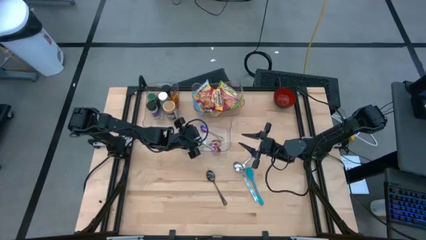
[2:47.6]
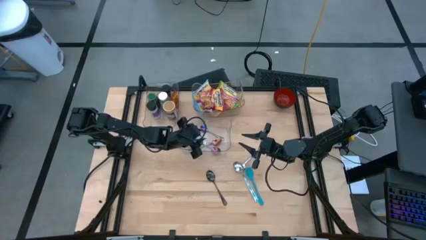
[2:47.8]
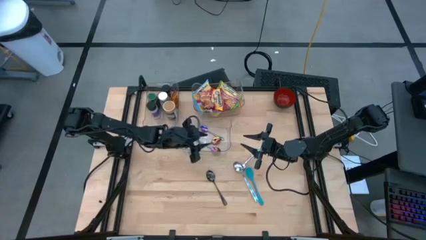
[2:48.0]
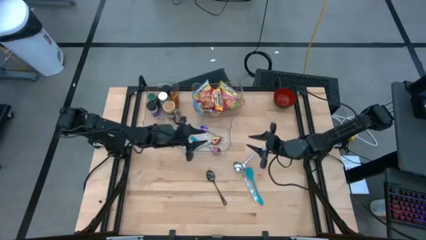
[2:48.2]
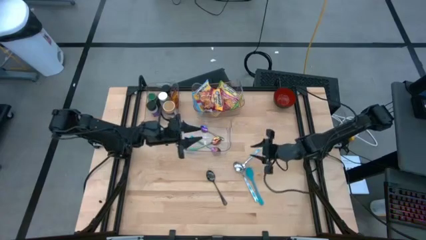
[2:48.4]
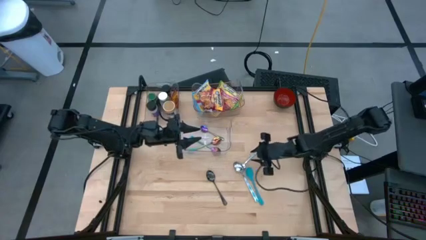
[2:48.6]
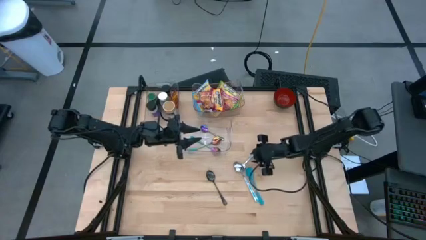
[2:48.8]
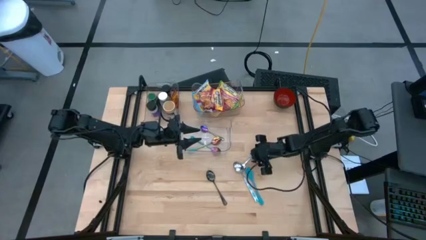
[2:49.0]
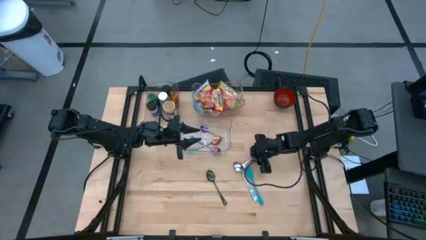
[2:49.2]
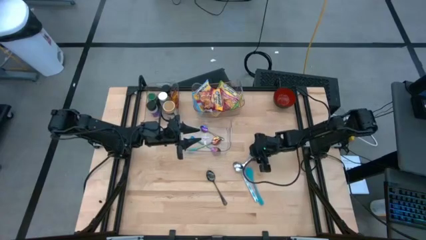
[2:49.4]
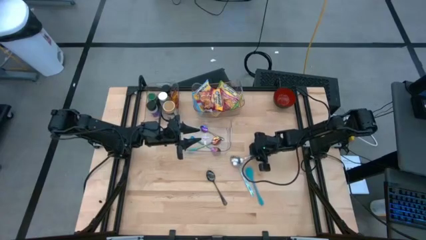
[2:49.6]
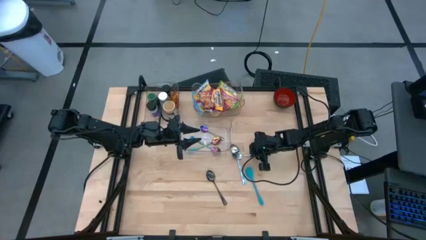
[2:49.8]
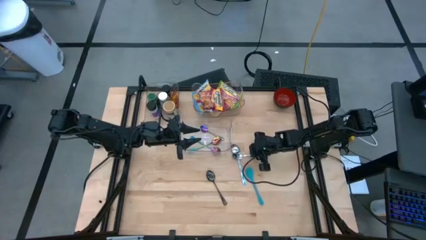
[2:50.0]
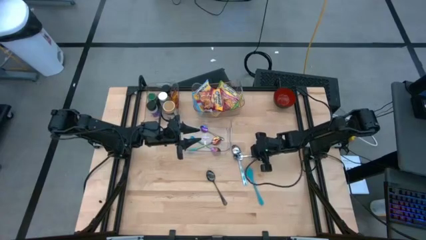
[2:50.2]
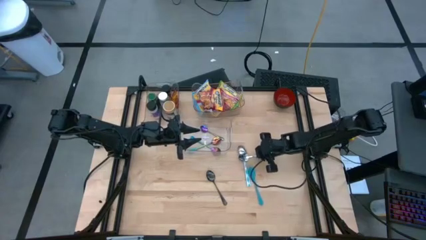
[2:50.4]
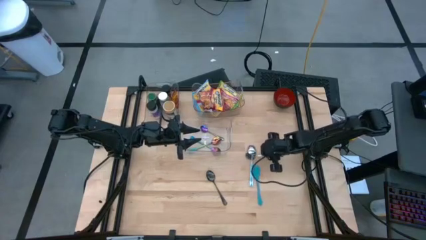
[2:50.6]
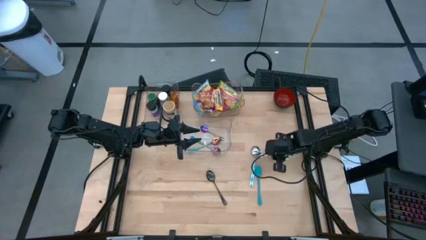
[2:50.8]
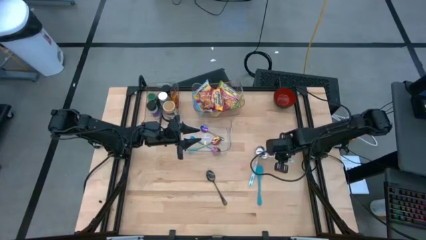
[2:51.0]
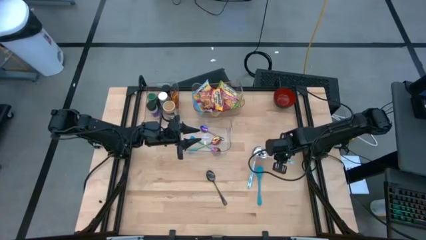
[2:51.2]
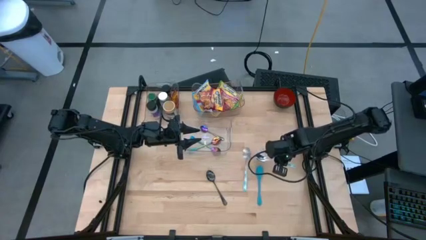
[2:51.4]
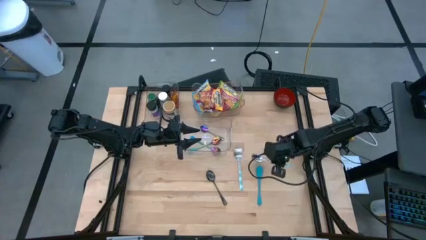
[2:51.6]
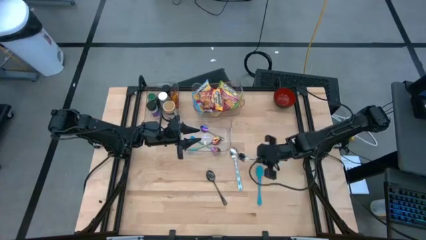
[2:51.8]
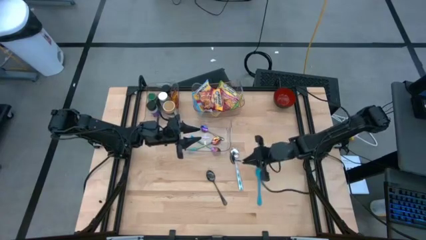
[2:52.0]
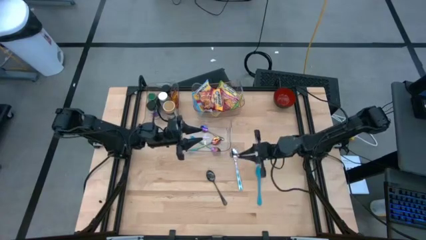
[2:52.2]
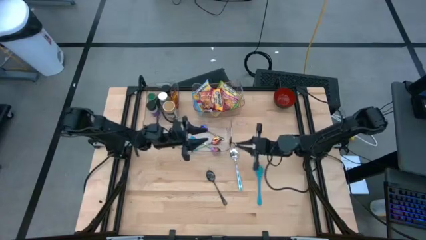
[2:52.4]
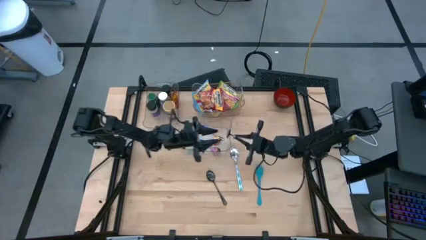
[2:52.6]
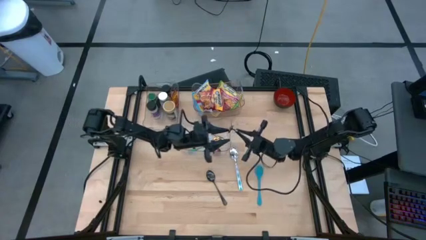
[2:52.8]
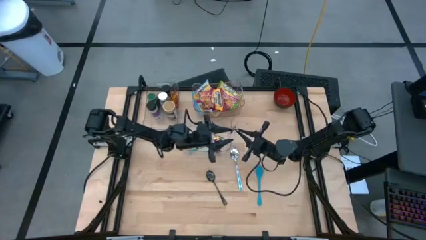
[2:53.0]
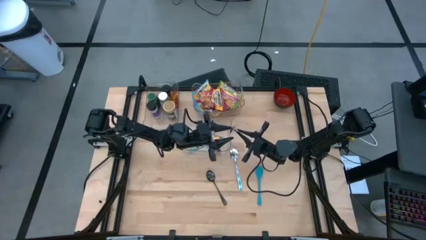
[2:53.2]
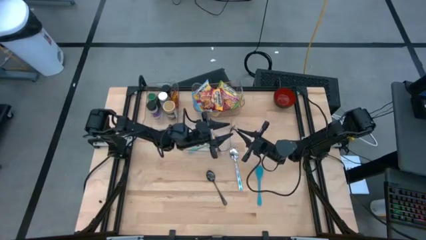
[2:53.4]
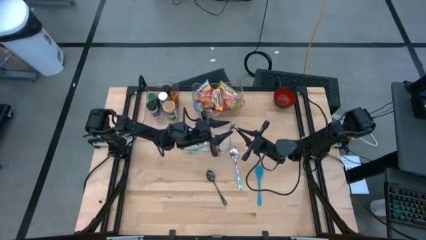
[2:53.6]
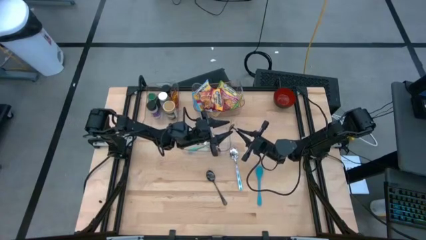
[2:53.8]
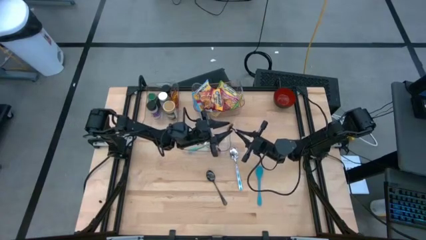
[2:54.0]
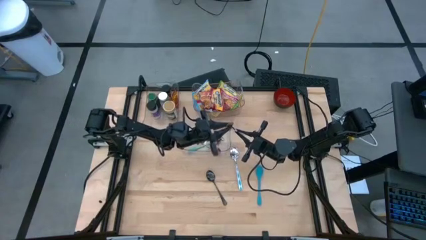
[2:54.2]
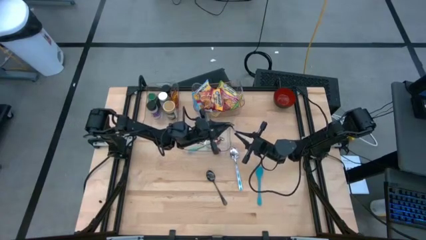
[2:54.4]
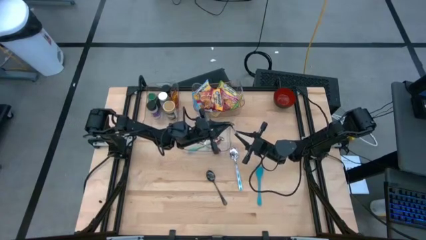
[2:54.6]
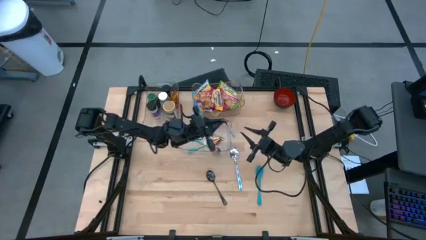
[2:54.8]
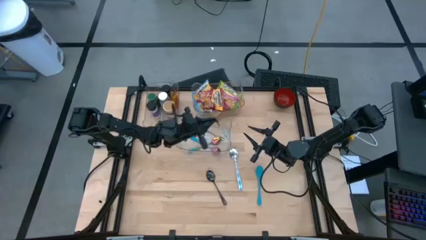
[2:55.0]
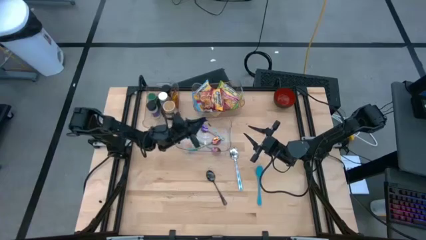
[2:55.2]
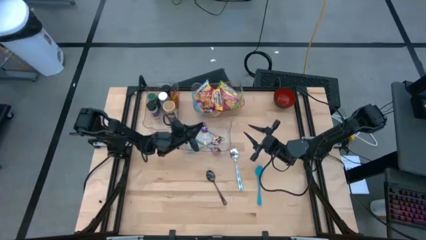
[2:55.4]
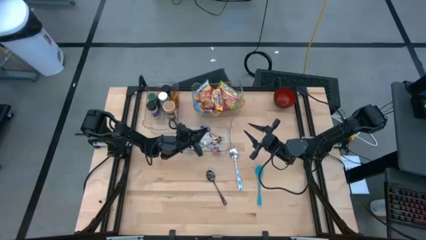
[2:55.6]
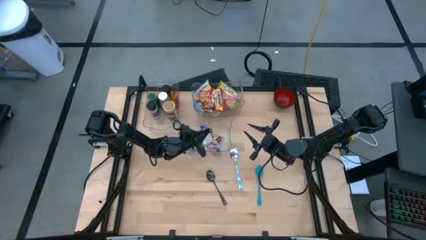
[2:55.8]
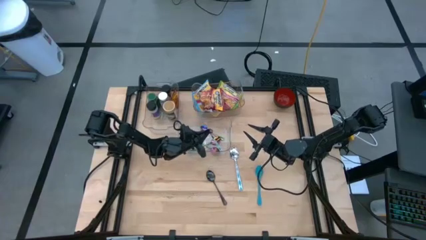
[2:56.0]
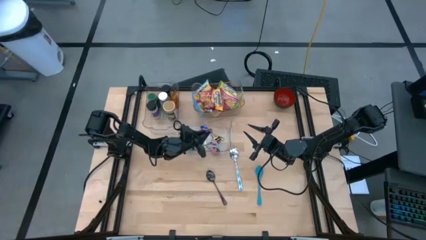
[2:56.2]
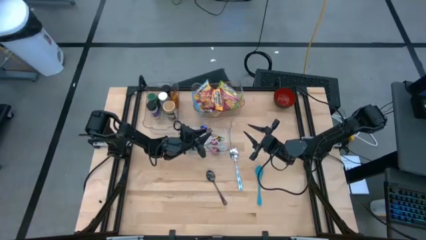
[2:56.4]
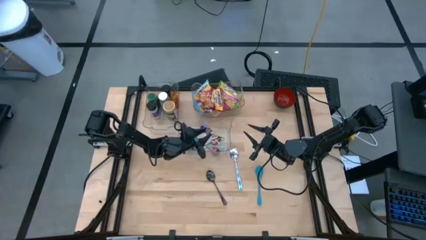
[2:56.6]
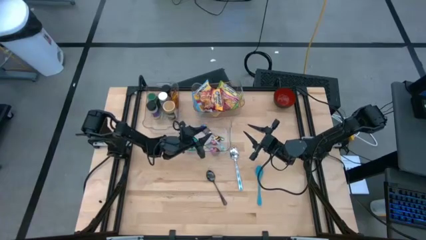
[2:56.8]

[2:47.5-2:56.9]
Task: Pick & Place Food Item
Put the top blue and white spoon into the bottom transparent bin

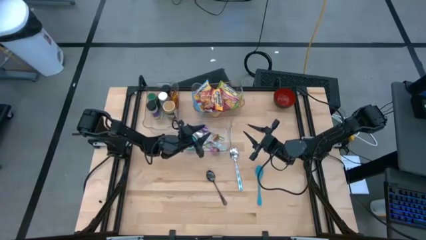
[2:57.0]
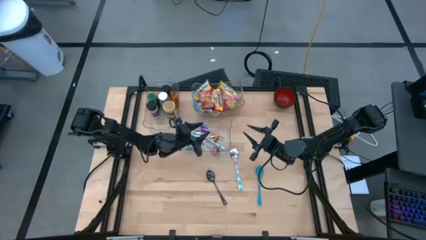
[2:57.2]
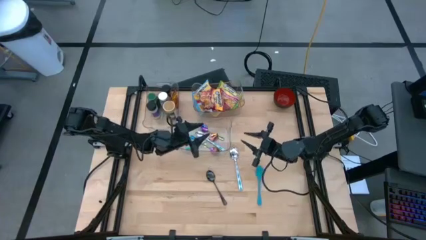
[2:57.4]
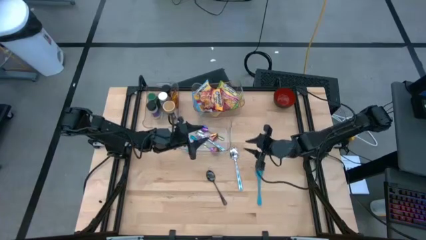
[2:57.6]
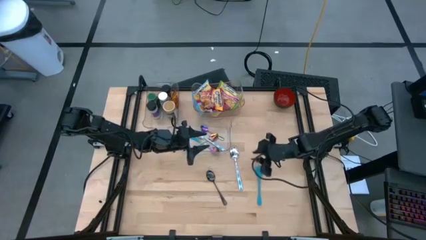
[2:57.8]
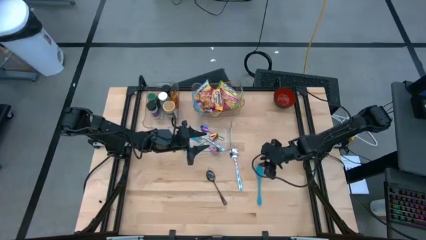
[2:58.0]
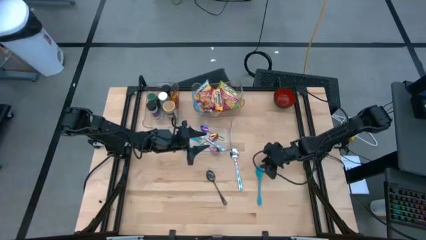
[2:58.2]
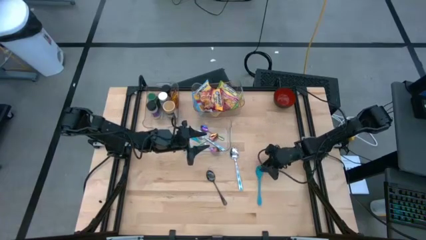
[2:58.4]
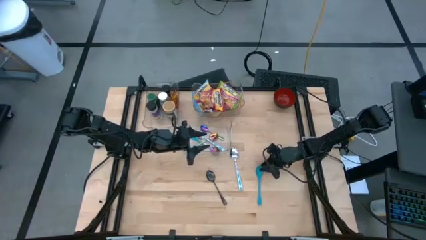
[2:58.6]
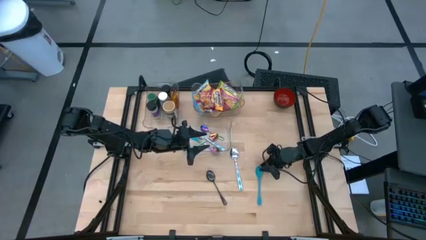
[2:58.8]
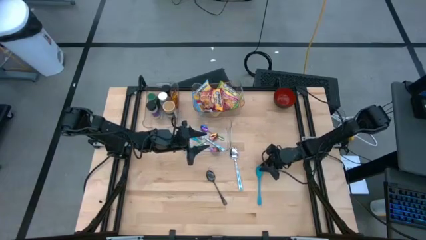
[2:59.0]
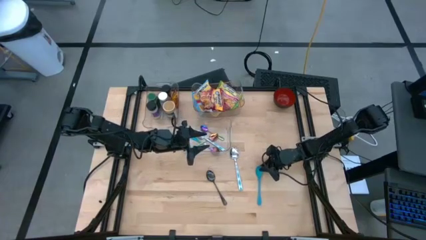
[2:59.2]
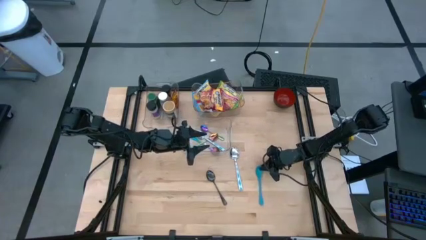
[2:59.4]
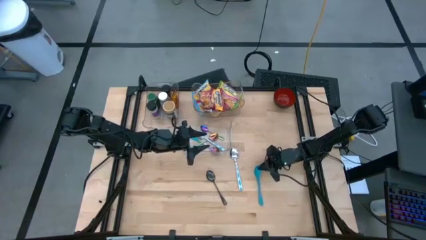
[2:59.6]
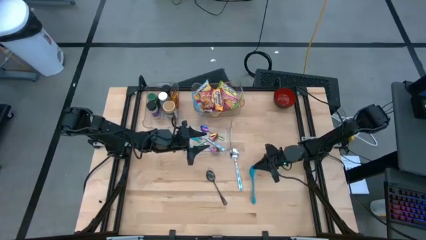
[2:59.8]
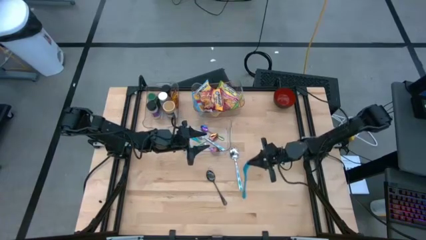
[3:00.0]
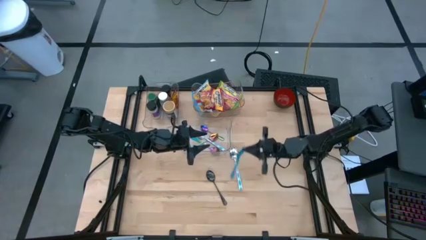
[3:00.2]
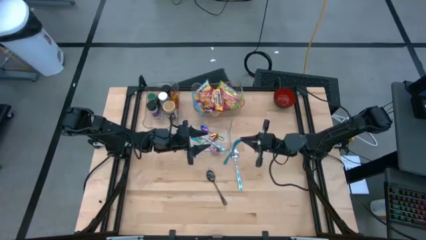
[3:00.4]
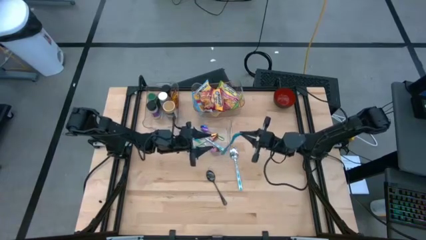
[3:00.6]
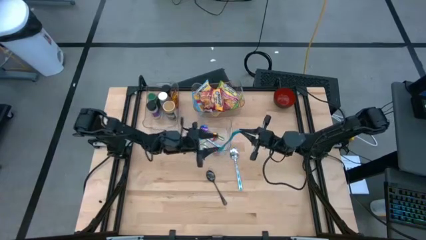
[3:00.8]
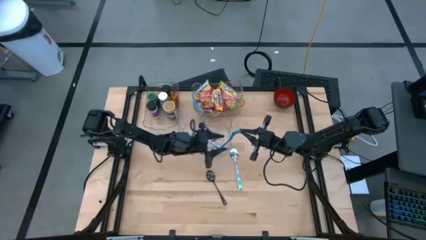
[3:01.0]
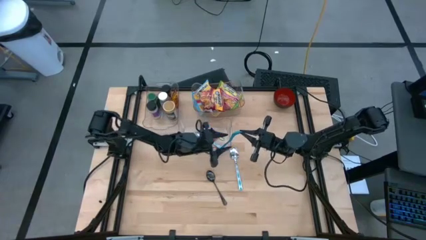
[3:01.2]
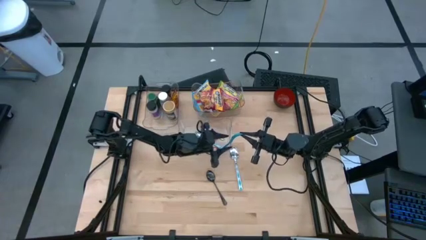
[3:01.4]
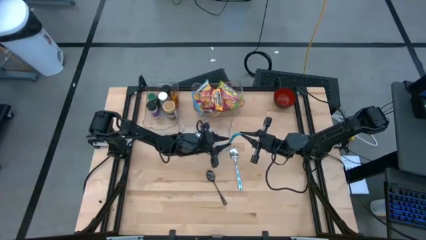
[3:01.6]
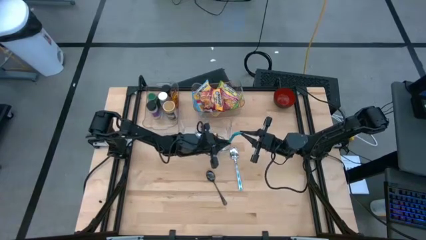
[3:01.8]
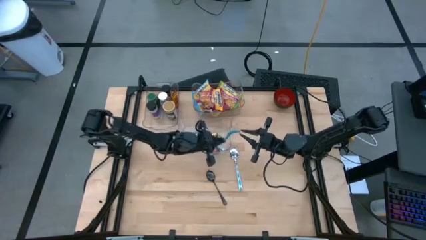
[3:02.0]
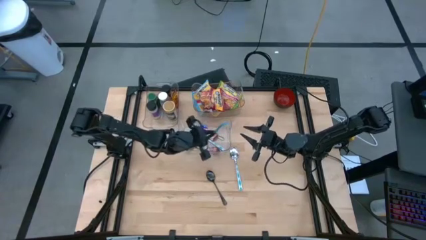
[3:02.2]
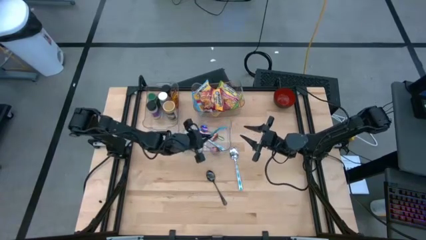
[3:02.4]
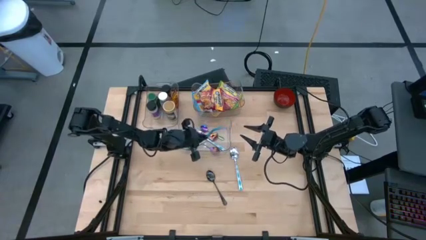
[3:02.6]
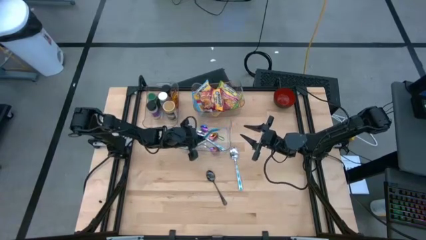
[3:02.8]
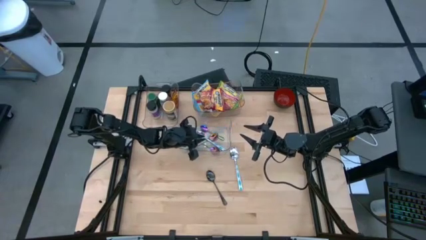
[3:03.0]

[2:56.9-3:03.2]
Put the blue baby spoon into the bottom transparent bin
